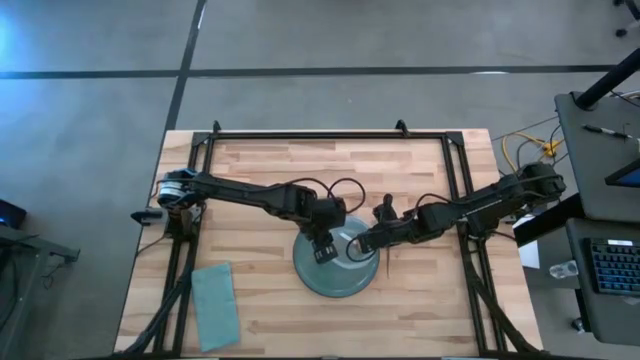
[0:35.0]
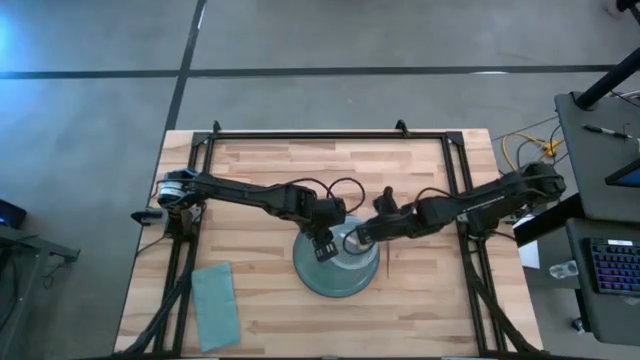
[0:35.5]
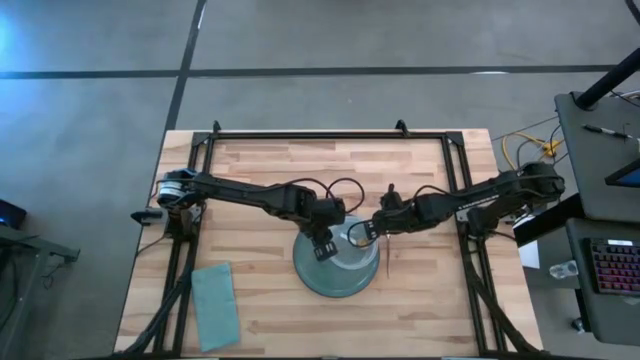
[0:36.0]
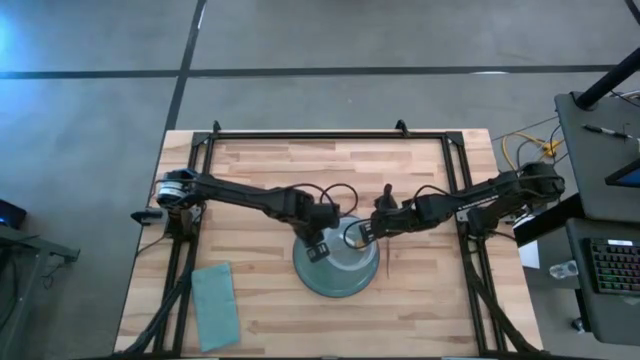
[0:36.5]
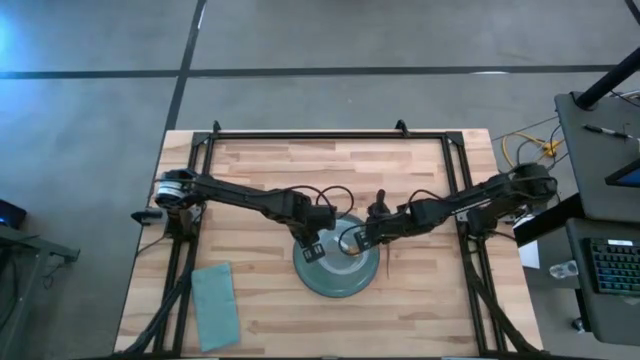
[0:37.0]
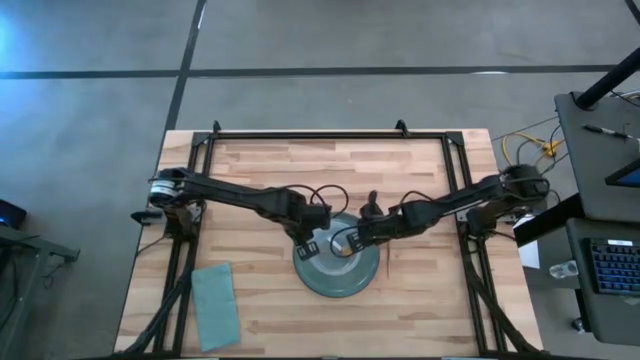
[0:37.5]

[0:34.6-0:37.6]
Task: Set table place
Adjust the transparent bowl on the plate

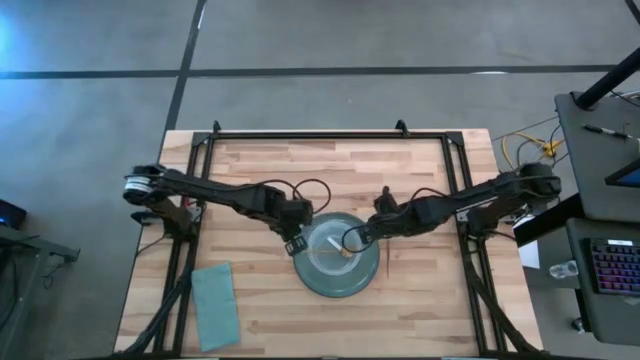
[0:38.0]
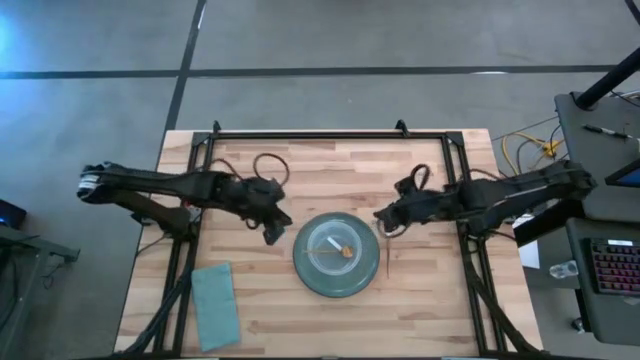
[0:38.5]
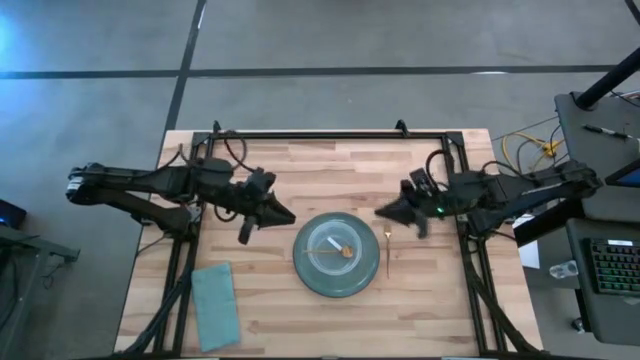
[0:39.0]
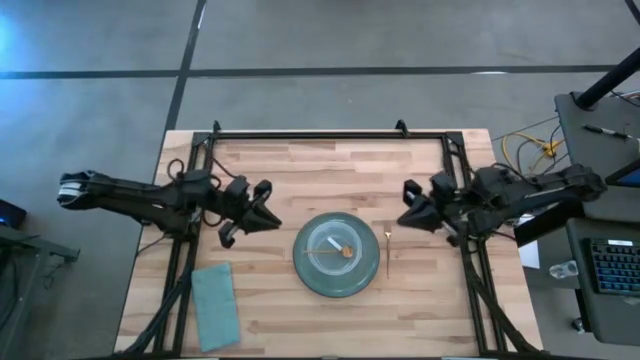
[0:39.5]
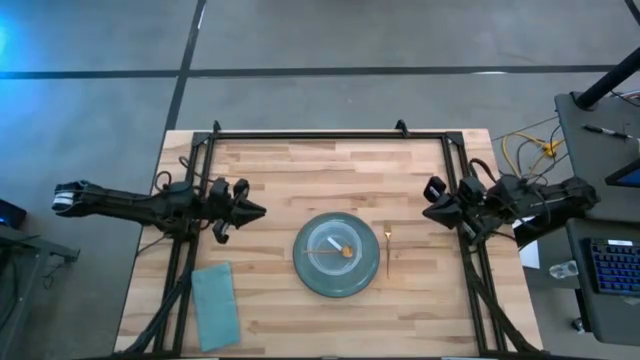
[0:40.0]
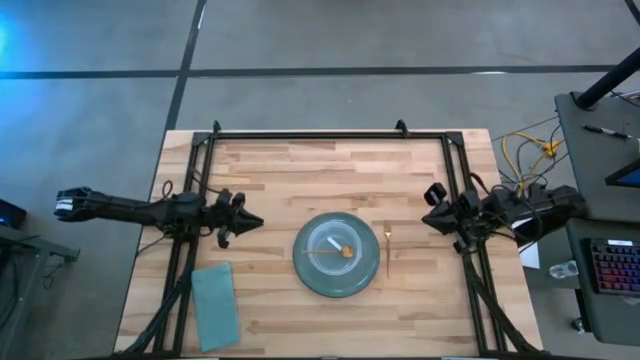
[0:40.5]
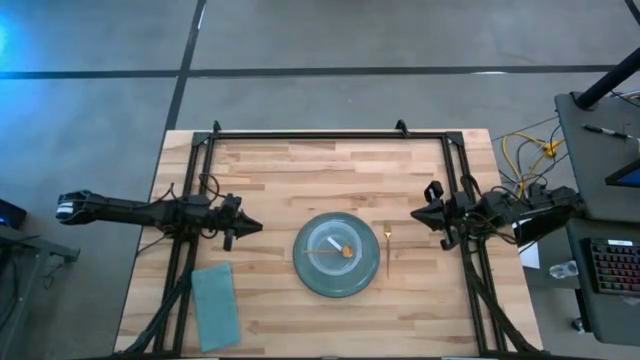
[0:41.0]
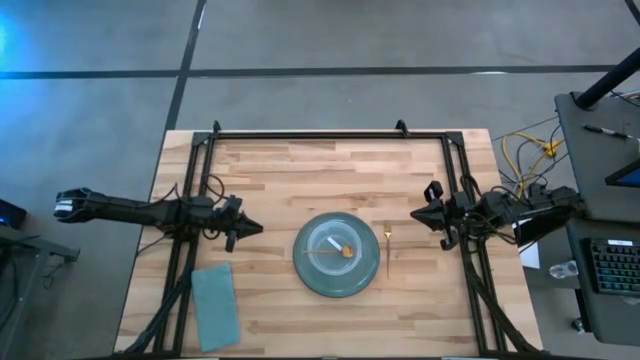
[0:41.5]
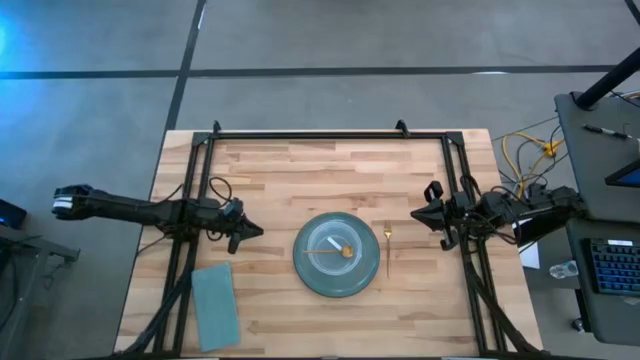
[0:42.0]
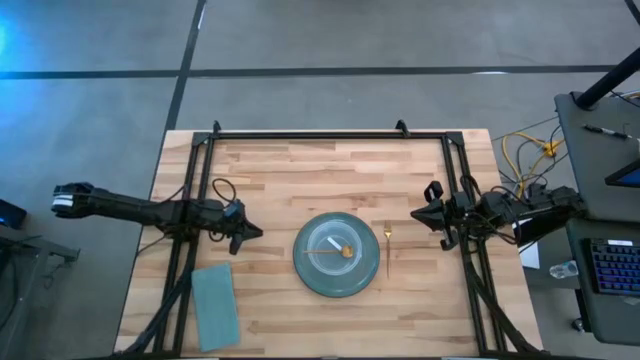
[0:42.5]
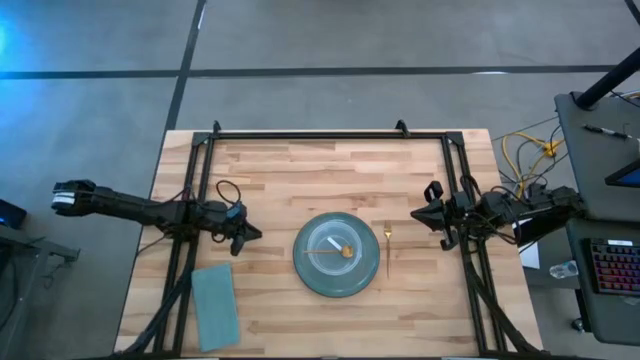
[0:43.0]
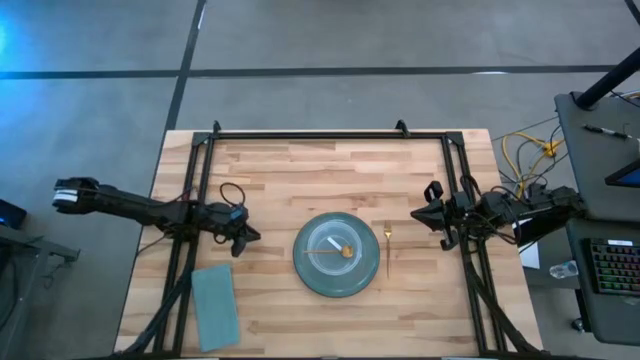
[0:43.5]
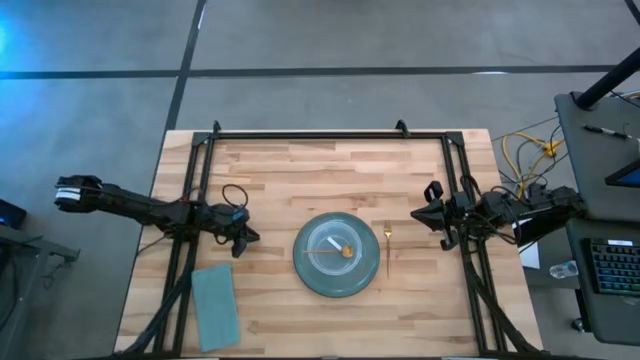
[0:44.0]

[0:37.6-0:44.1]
Return to Home Position

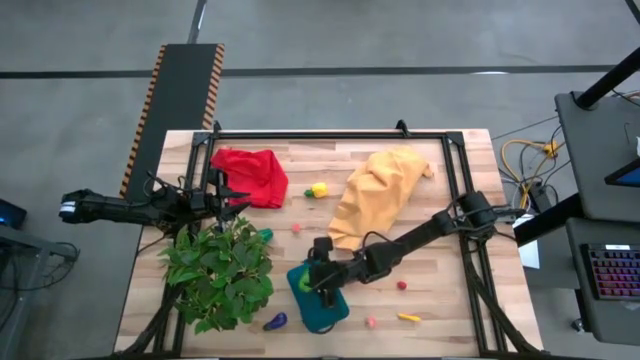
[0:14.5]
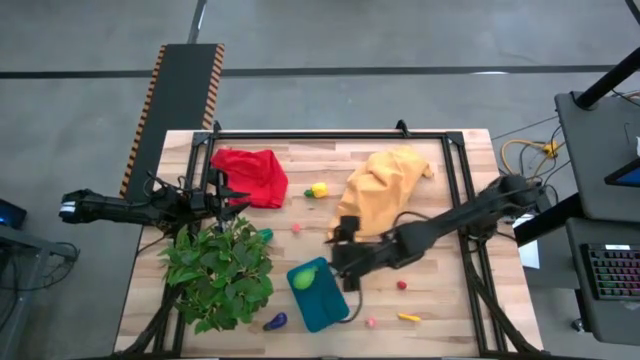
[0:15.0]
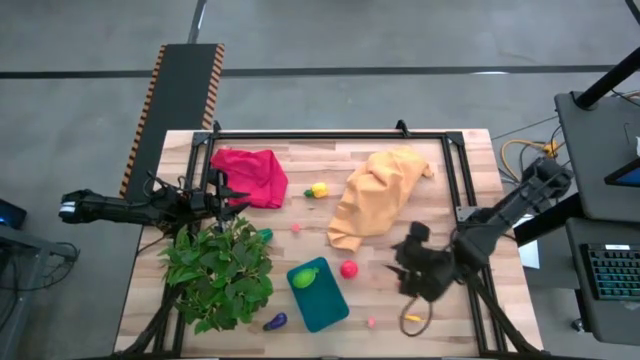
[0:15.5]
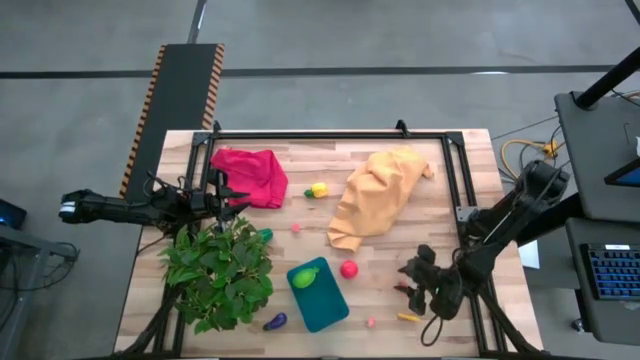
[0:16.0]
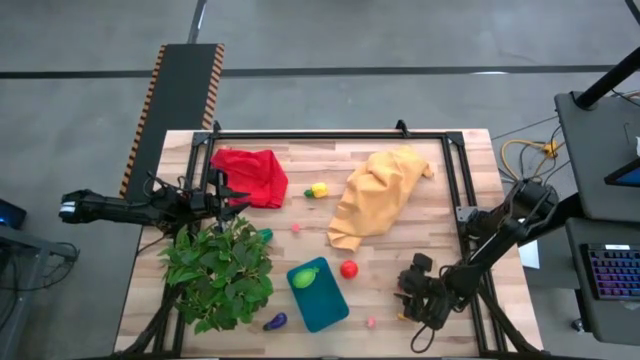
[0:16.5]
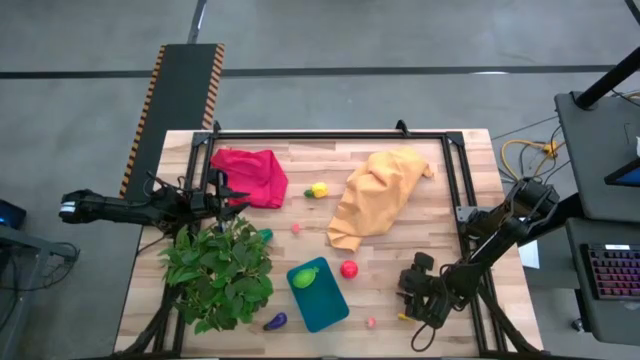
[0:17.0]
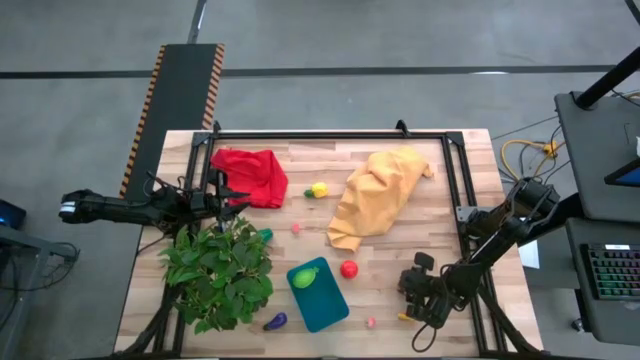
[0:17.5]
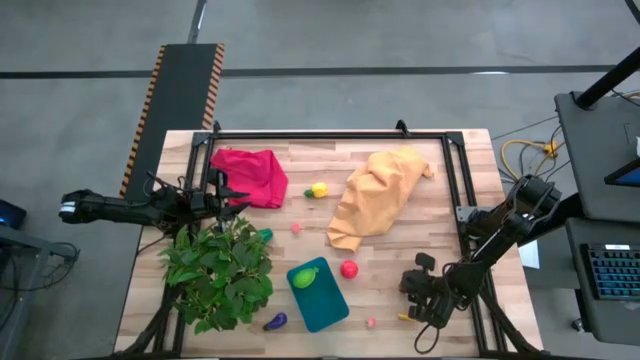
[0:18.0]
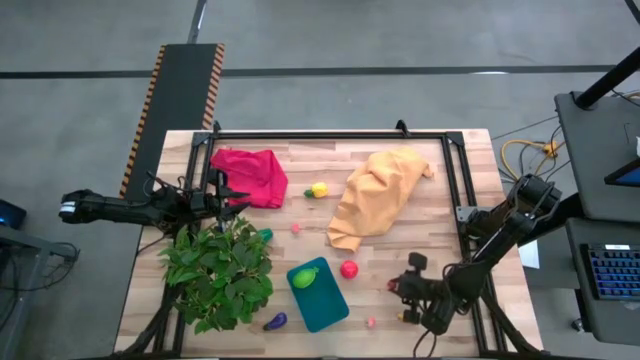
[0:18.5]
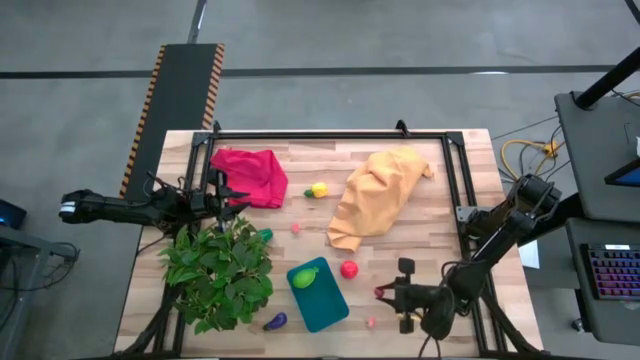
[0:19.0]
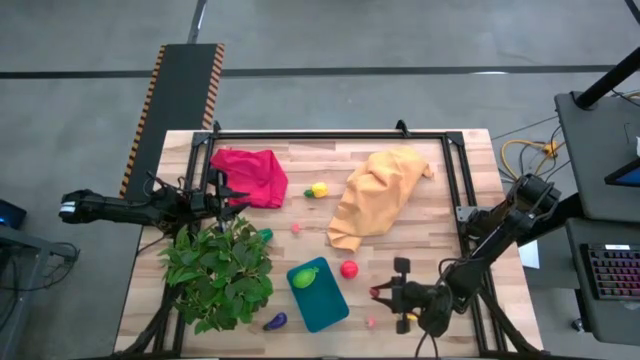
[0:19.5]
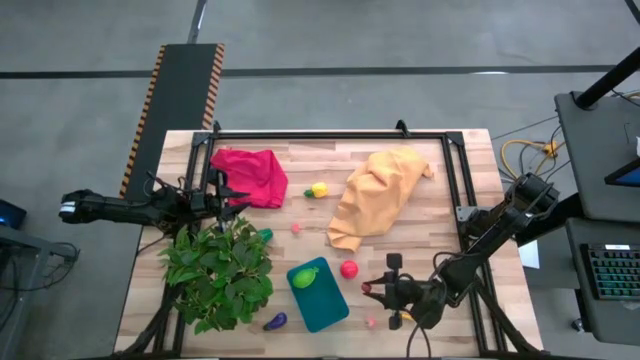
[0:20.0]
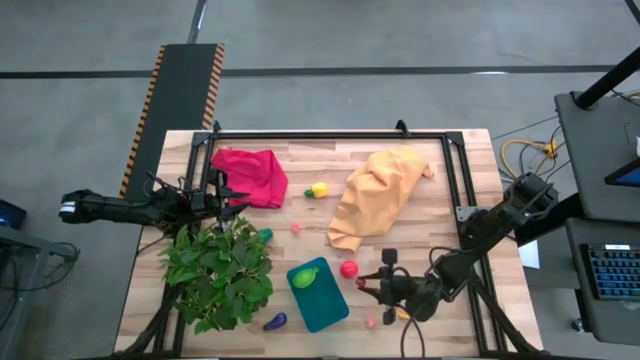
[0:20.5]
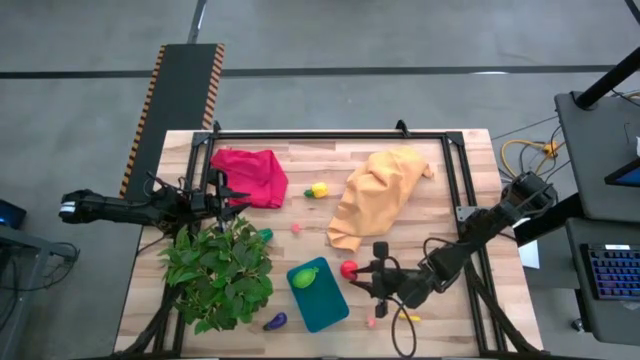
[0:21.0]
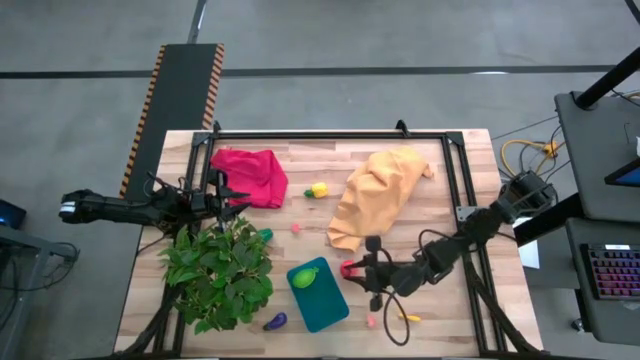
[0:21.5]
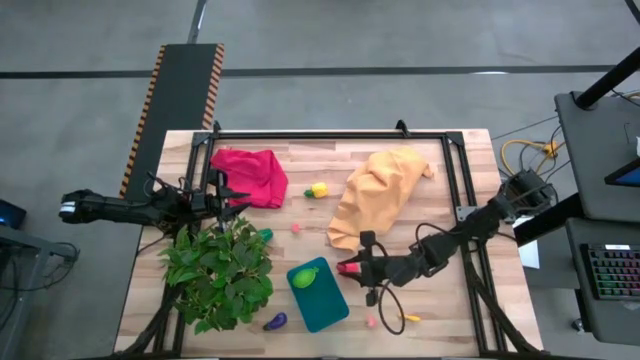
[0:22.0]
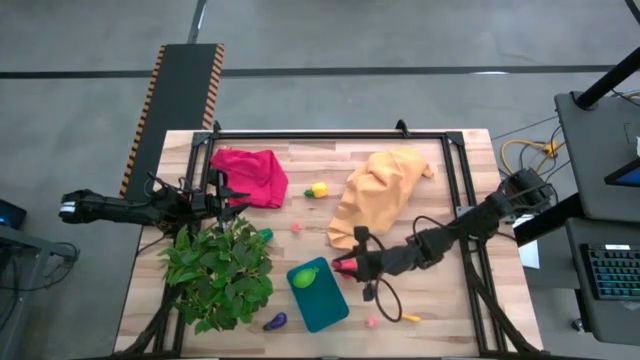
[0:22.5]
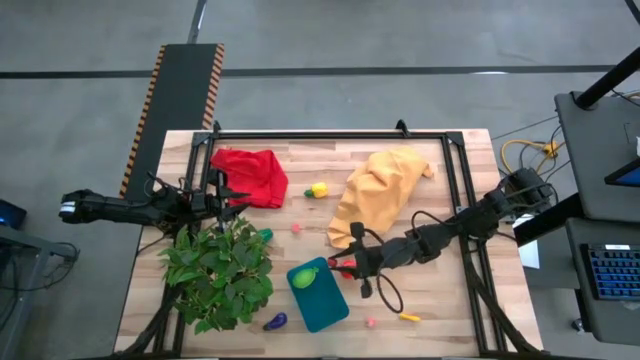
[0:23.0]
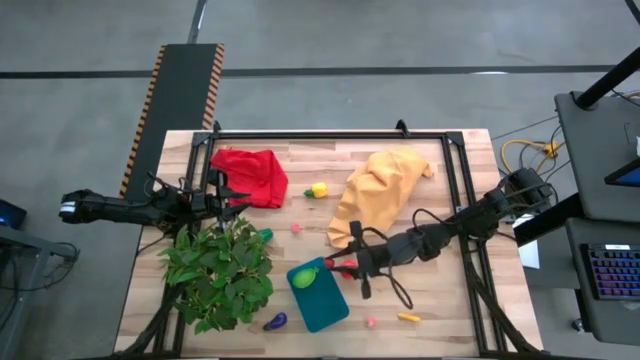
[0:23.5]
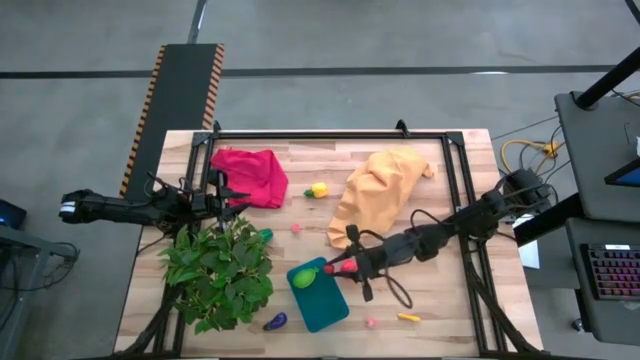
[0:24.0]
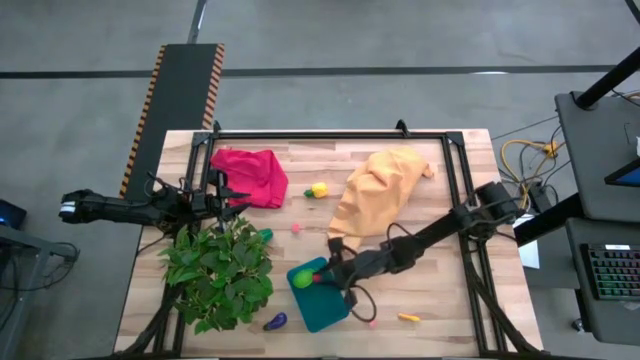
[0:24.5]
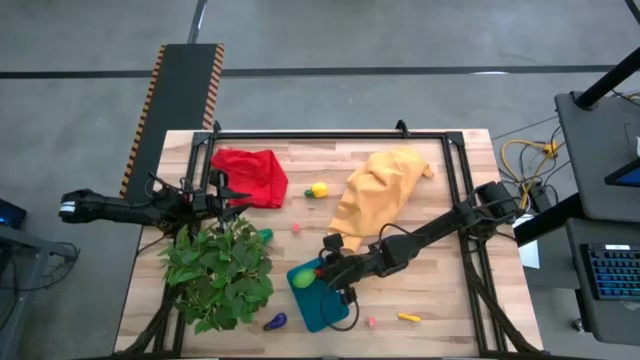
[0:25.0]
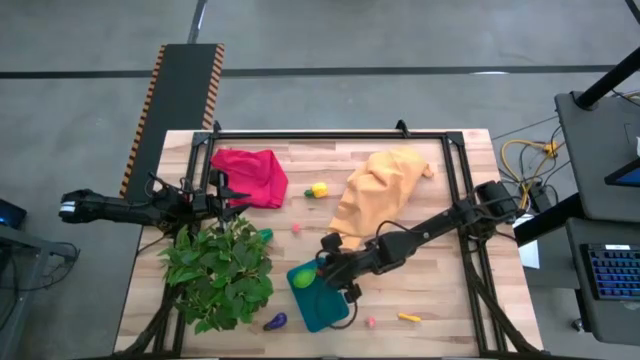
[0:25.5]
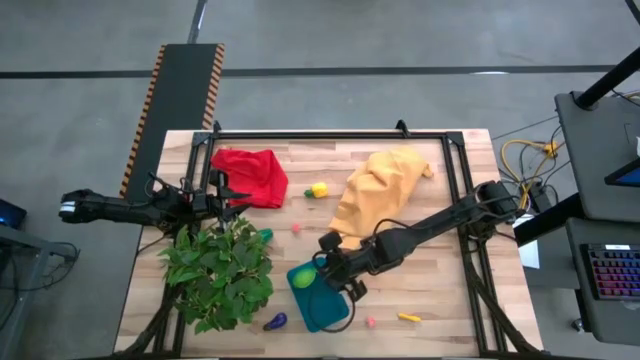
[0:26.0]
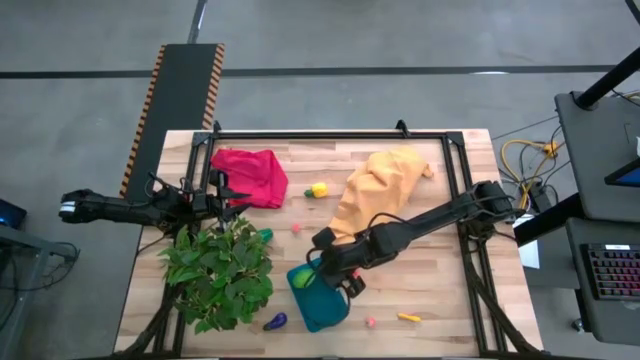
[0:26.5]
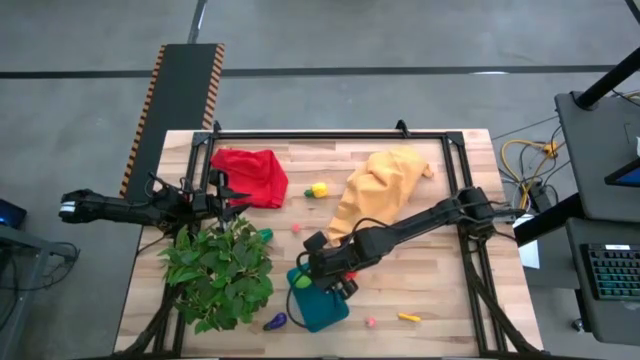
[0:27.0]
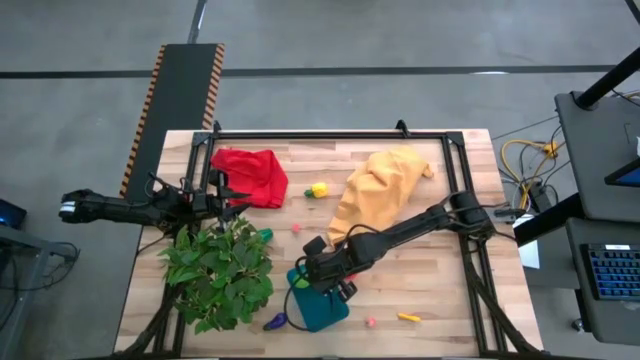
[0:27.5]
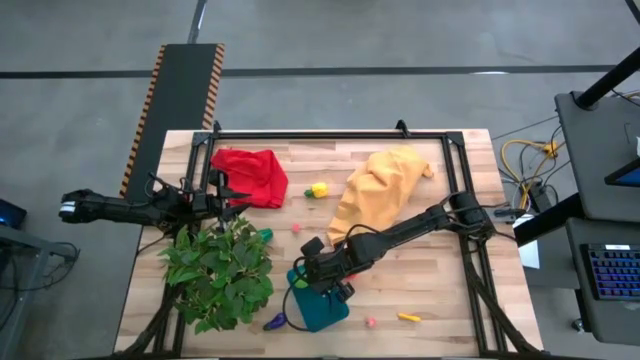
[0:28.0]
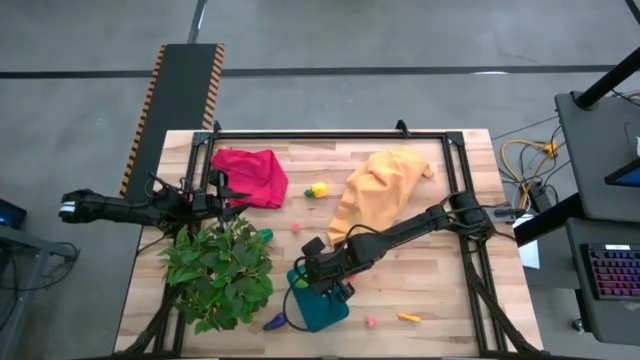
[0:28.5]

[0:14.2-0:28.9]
Task: Pick and placing Produce into tupperware
Put the raspberry into the bin
